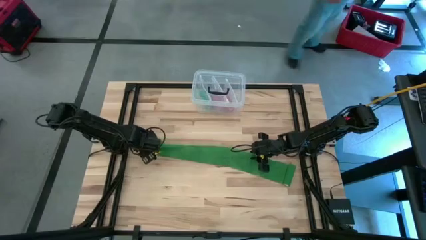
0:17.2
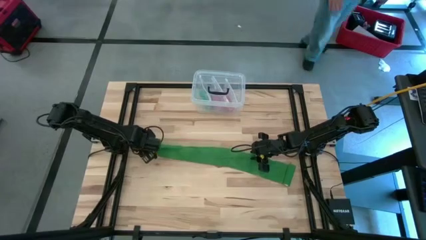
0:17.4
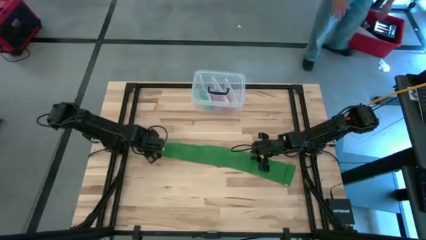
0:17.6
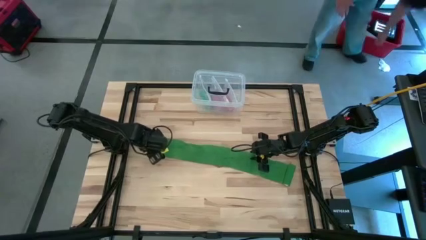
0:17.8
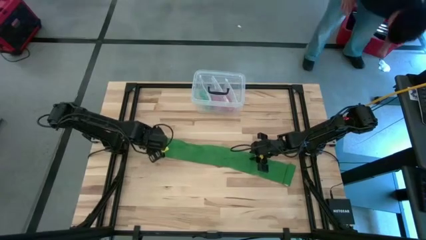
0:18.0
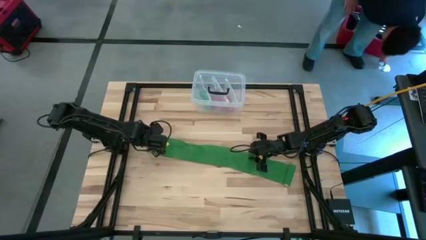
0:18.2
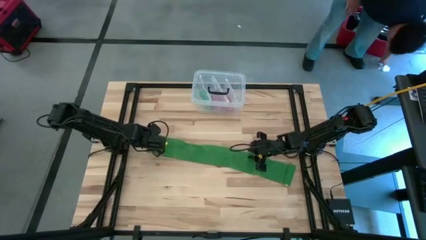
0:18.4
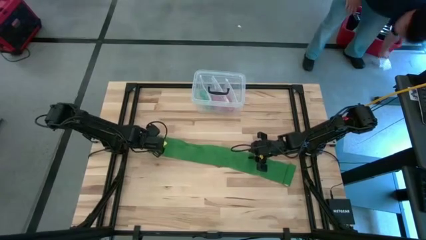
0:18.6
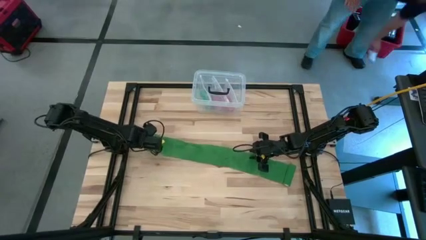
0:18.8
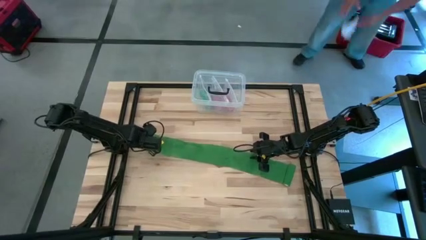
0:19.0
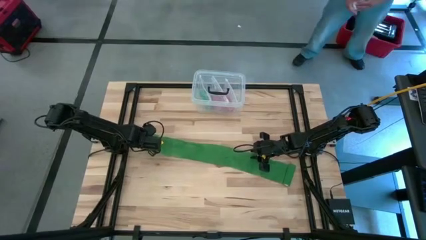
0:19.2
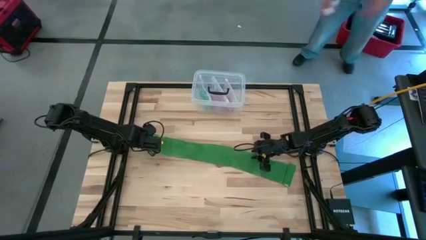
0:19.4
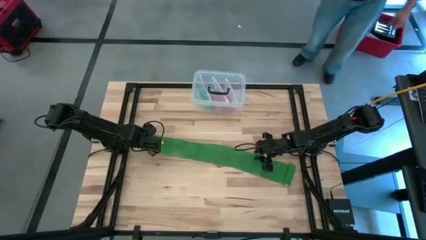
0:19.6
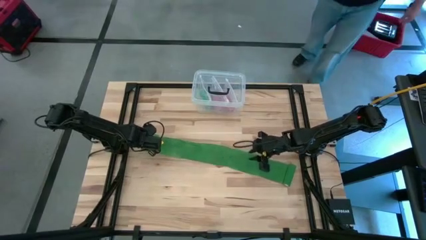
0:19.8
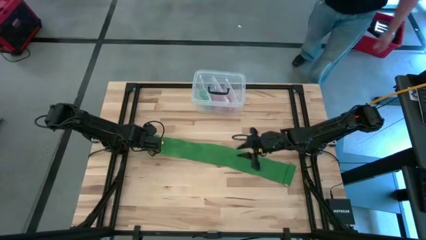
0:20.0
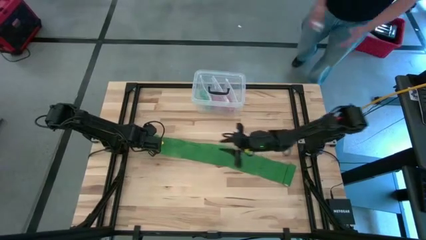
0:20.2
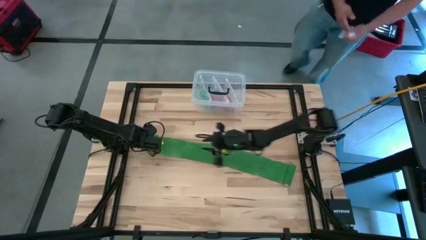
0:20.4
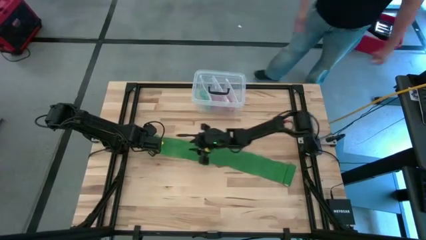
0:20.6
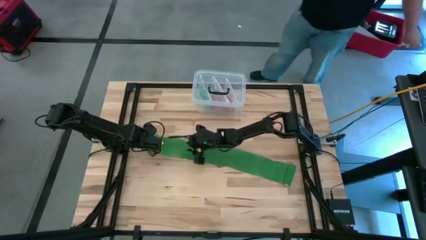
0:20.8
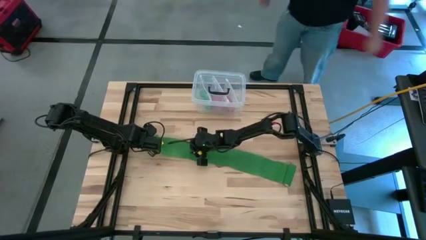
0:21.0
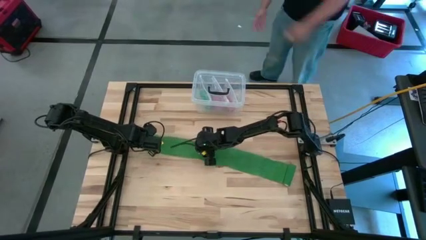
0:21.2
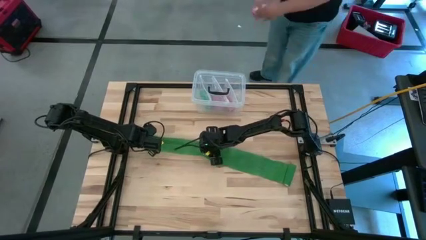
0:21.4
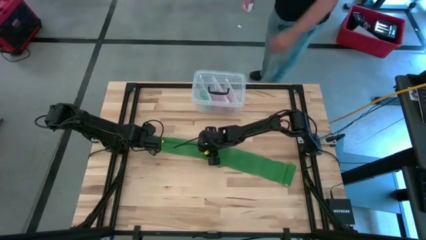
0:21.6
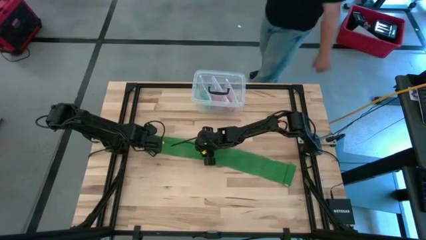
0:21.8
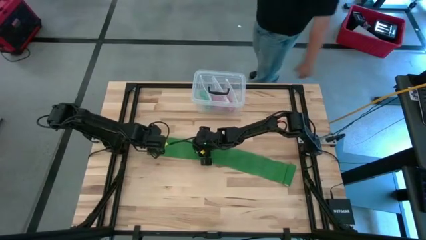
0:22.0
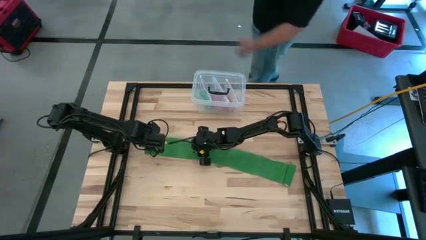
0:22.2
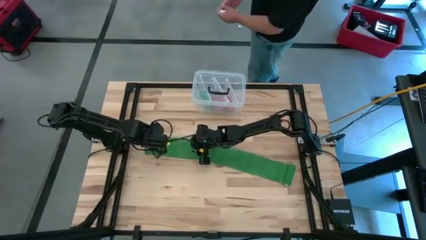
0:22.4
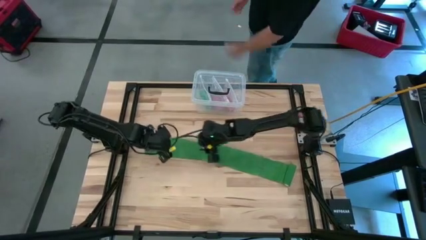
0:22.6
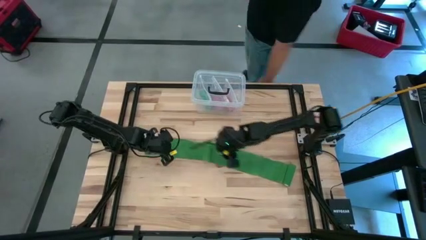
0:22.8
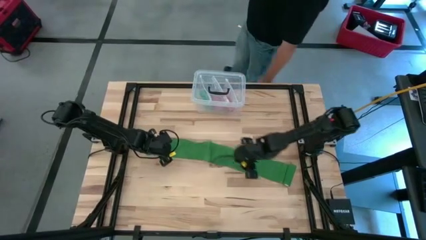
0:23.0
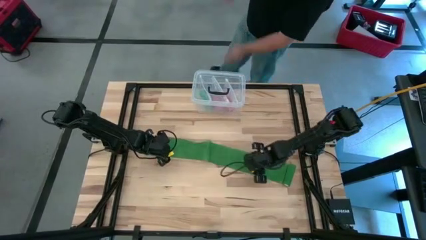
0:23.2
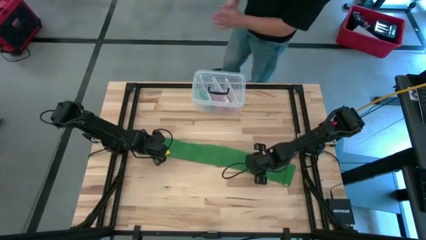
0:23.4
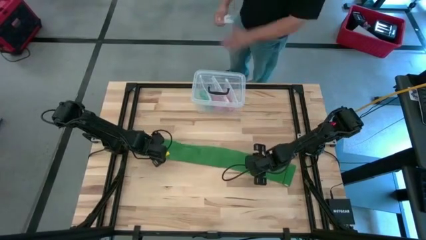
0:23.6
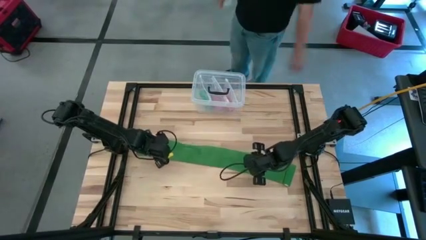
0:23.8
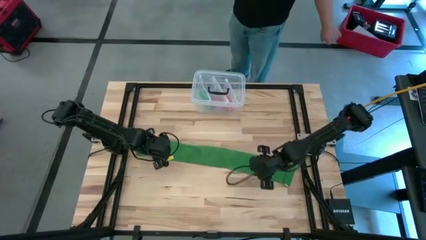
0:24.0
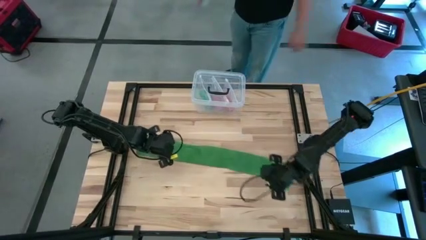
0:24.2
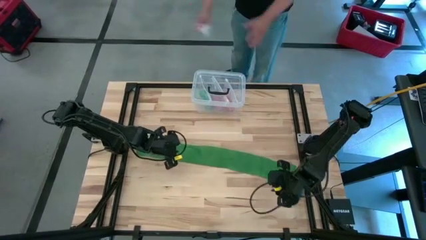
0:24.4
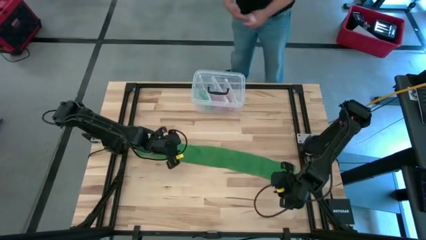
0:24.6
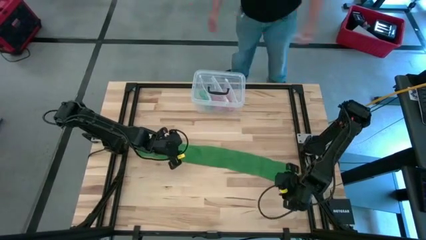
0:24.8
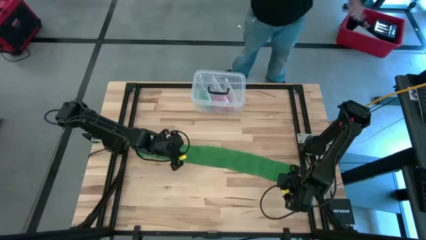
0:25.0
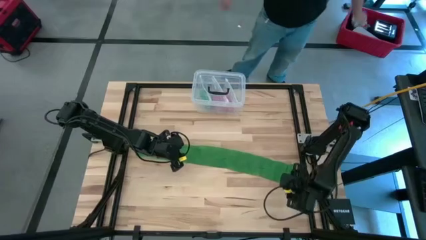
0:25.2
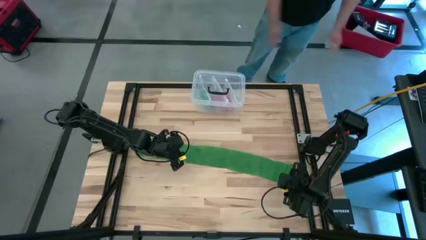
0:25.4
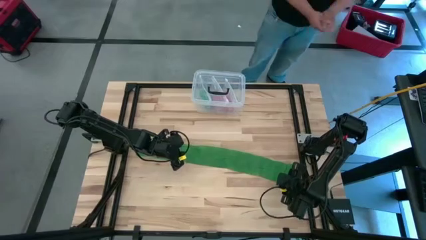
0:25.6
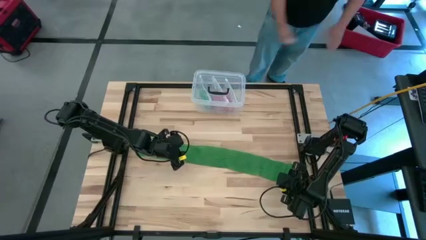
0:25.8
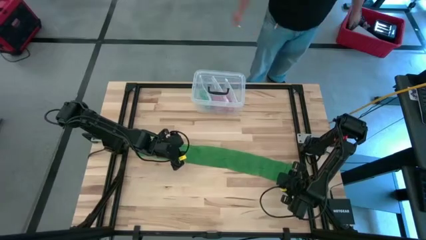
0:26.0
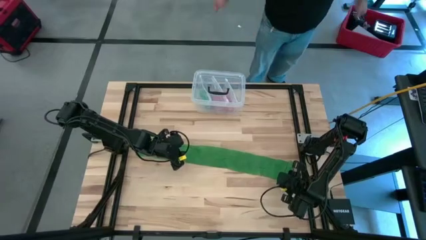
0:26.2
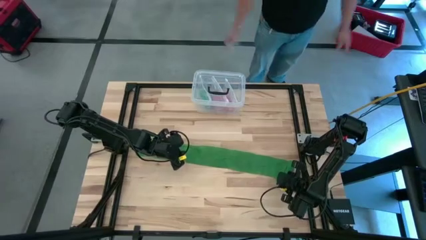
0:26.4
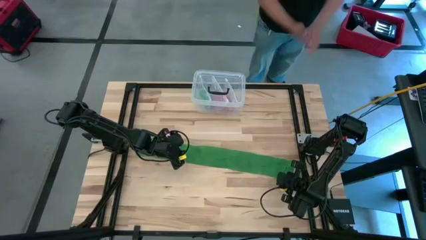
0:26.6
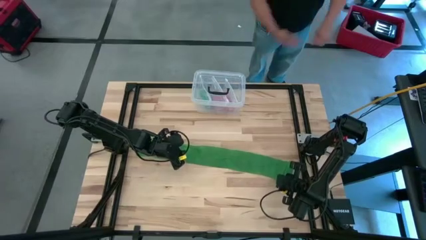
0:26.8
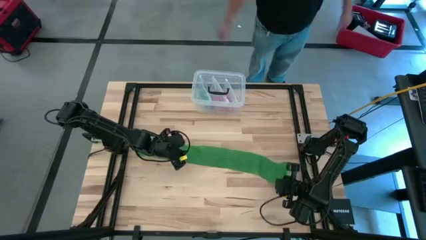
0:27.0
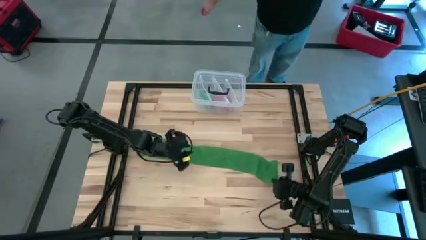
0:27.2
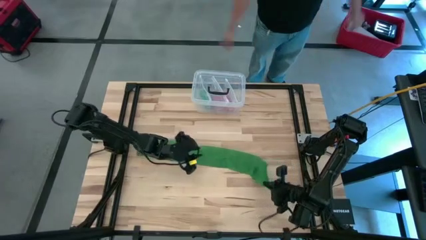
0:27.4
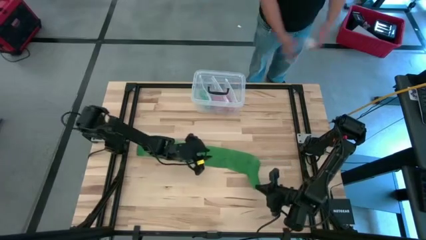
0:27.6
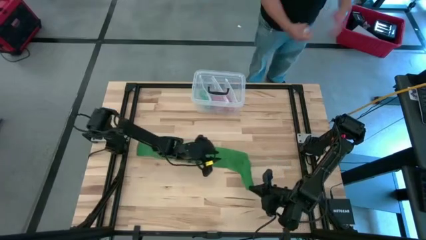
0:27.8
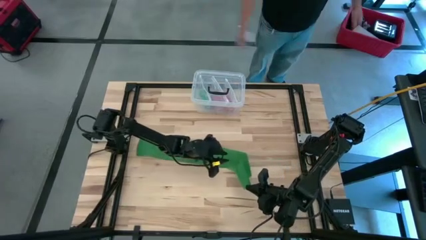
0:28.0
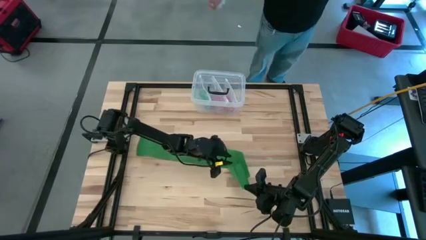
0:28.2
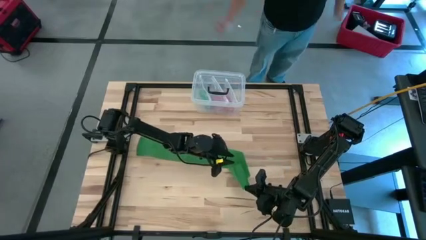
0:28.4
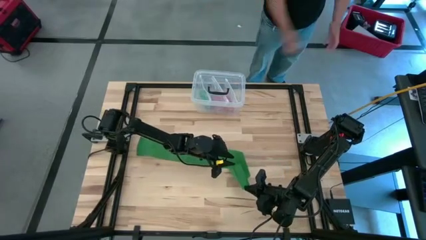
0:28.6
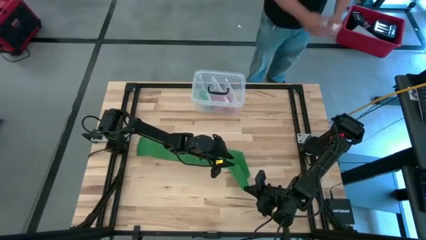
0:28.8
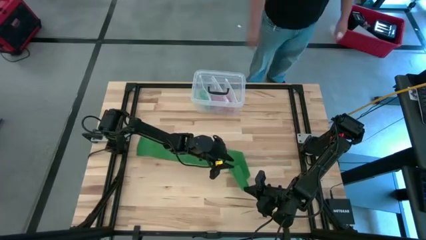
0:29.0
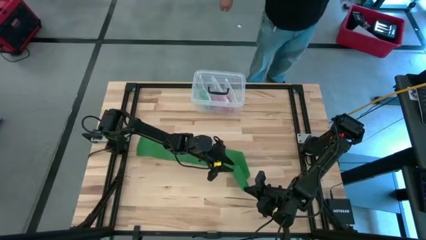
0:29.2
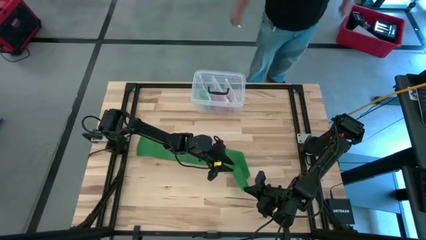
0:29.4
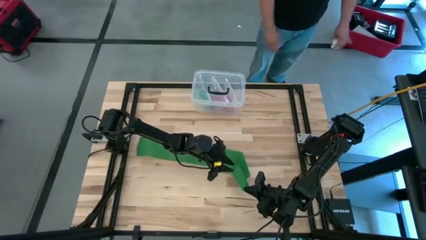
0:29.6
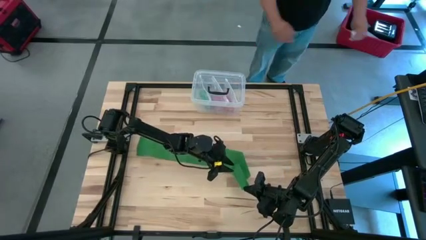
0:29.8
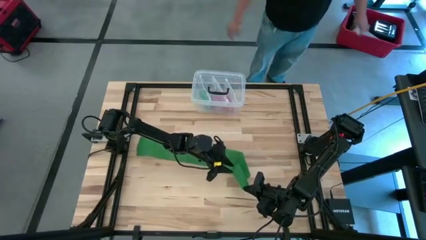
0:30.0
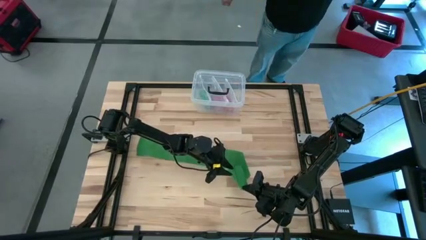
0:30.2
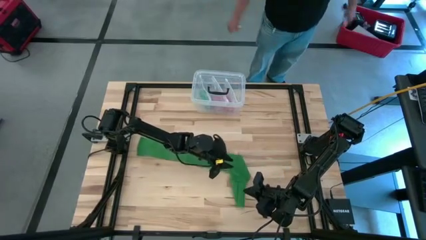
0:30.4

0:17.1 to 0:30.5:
Task: Roll bandage
Roll the green bandage

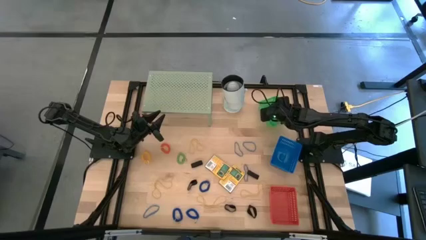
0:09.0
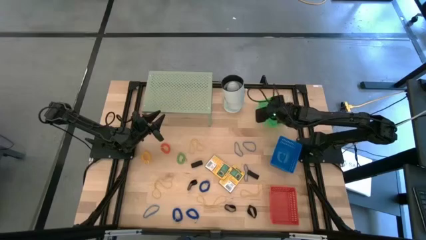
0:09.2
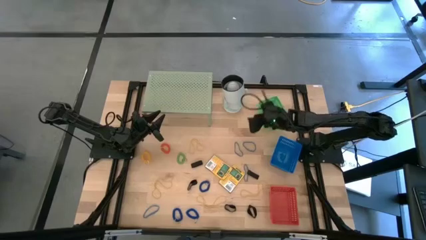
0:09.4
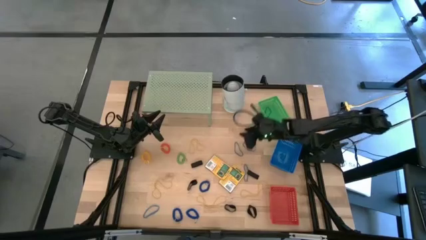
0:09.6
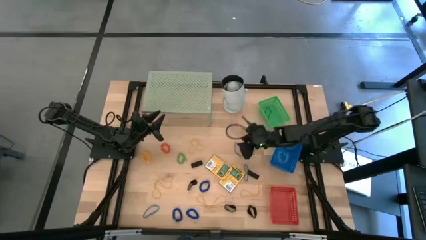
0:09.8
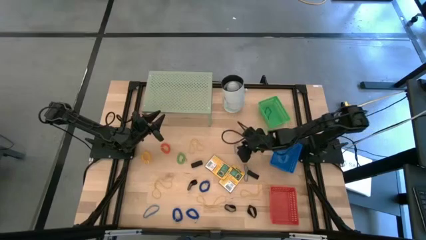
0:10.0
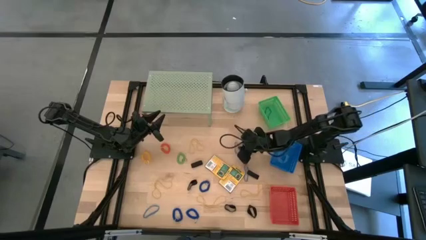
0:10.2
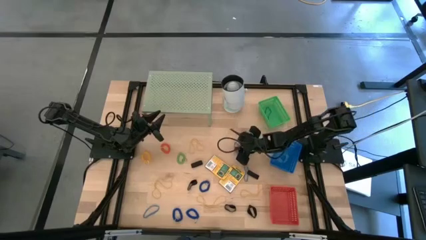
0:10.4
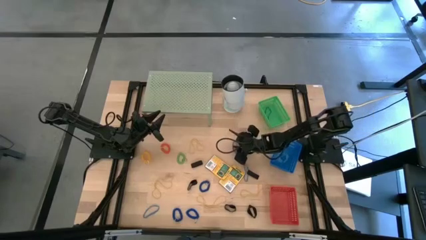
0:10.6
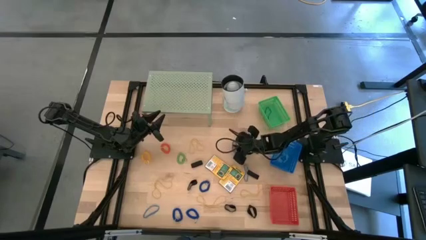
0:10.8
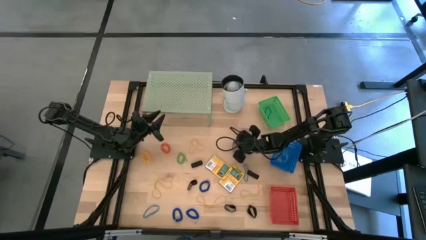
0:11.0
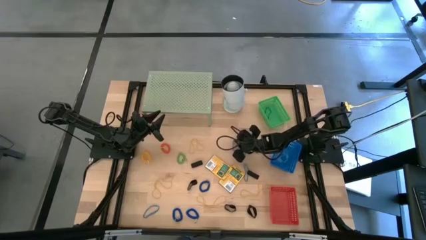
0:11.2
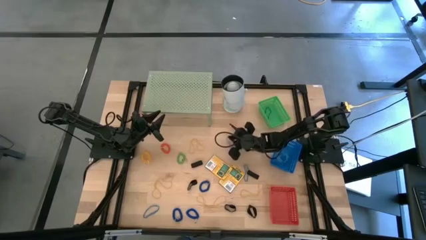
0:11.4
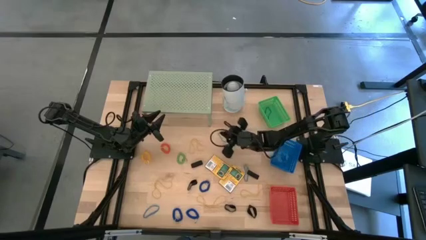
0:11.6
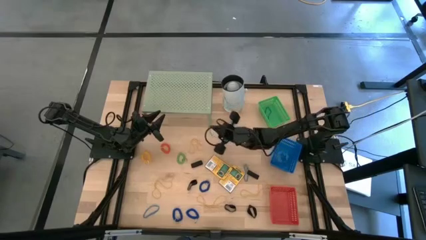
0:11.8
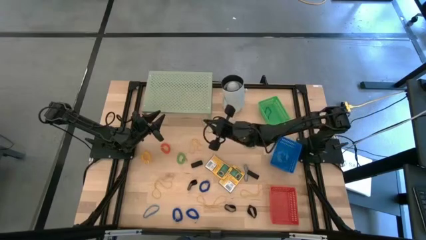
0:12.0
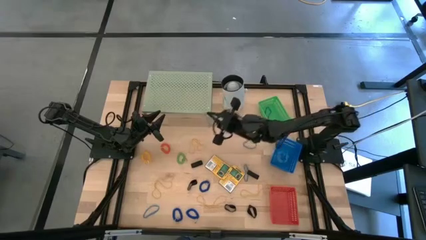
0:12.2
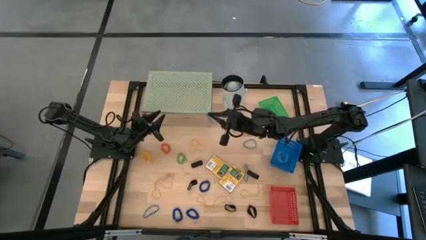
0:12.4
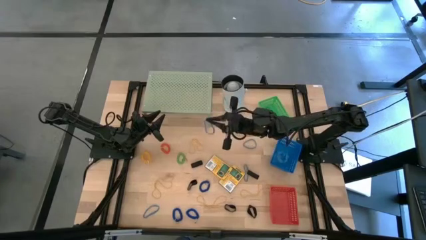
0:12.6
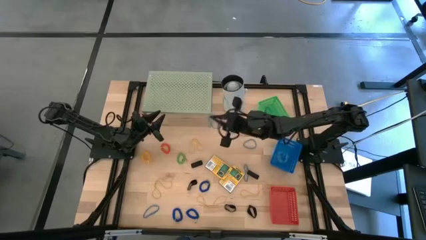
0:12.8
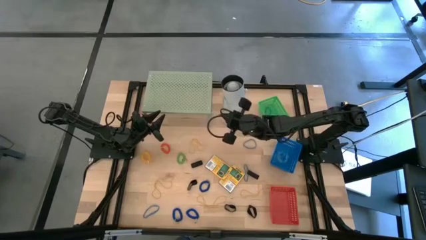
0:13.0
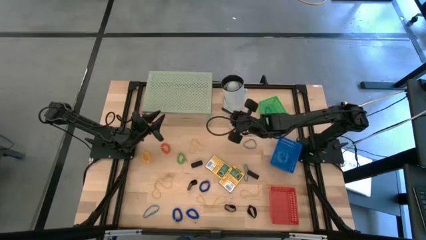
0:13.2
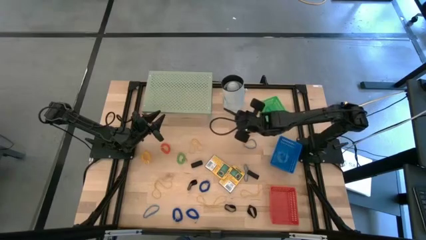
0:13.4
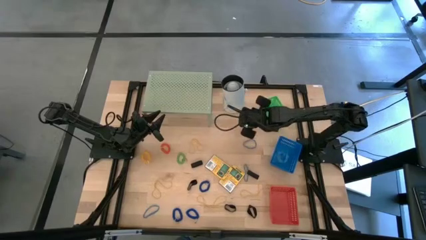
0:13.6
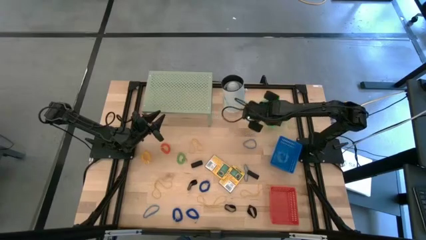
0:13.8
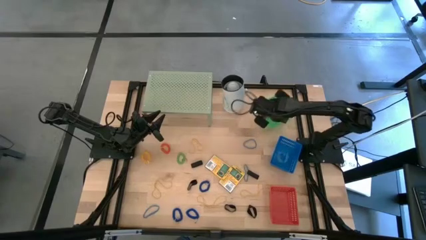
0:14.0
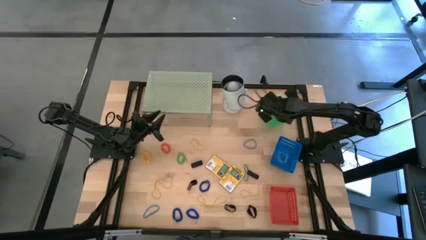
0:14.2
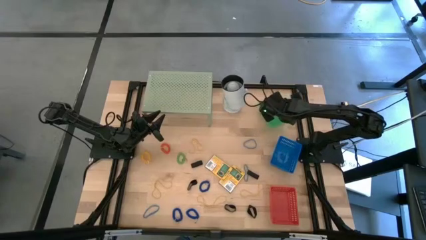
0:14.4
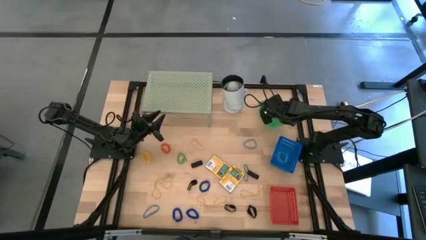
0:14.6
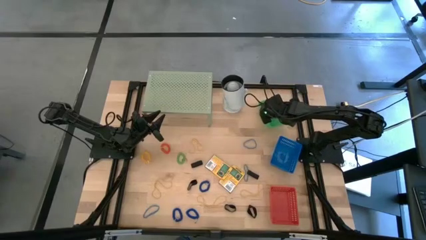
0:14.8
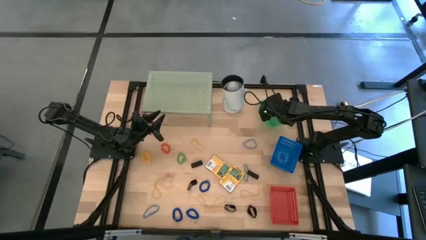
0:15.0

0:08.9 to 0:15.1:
Task: Pick & Place Office Desk Supplies
Put the blue rubber band into the green bin
